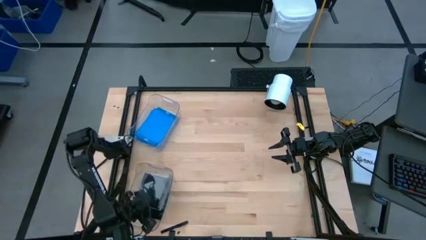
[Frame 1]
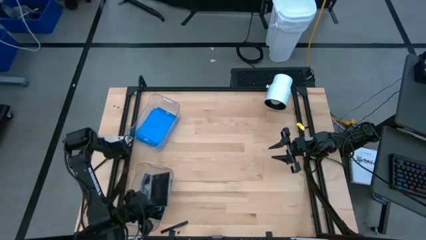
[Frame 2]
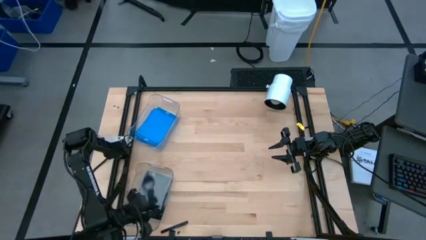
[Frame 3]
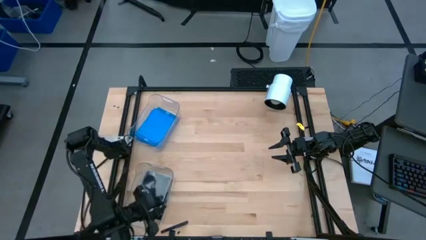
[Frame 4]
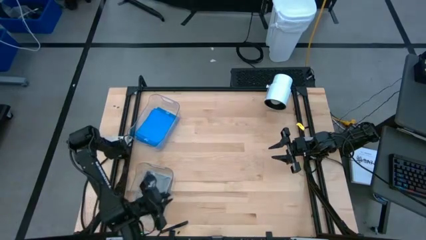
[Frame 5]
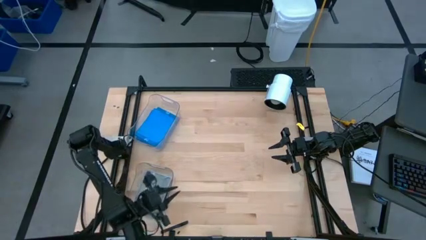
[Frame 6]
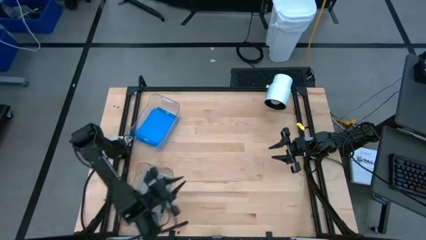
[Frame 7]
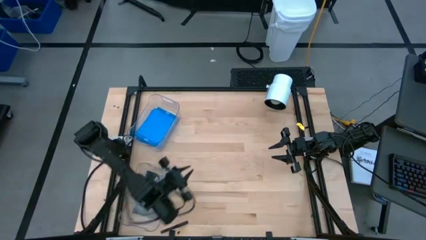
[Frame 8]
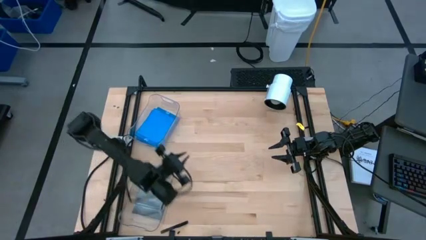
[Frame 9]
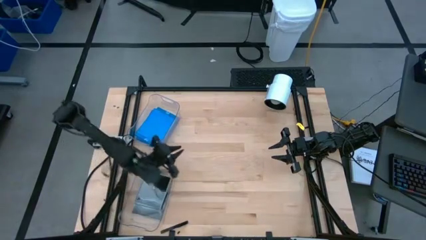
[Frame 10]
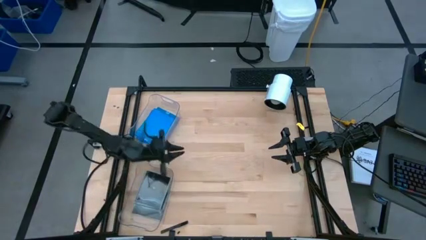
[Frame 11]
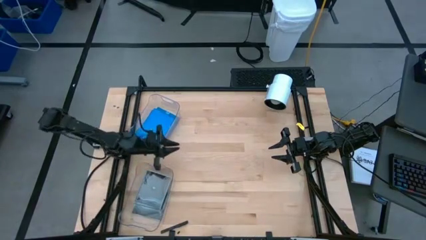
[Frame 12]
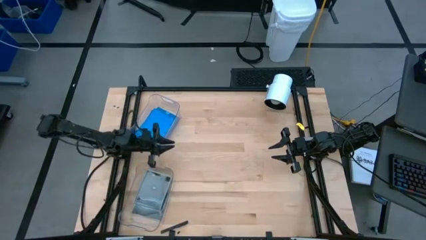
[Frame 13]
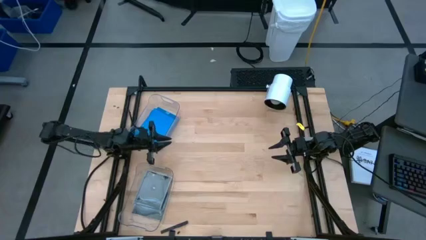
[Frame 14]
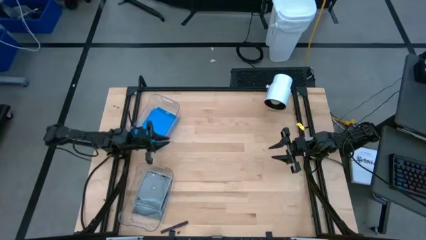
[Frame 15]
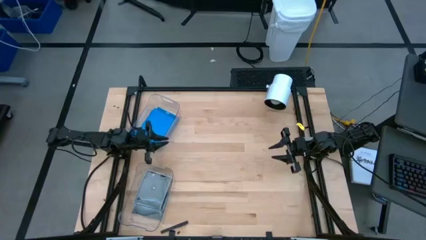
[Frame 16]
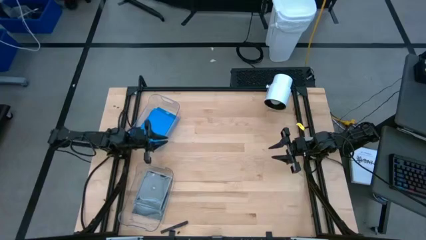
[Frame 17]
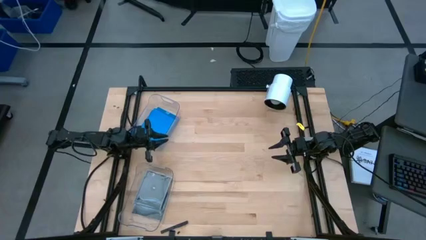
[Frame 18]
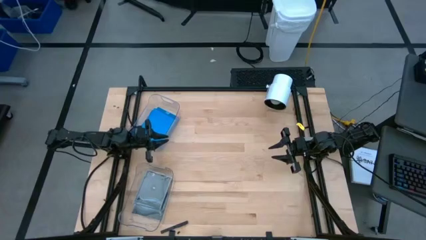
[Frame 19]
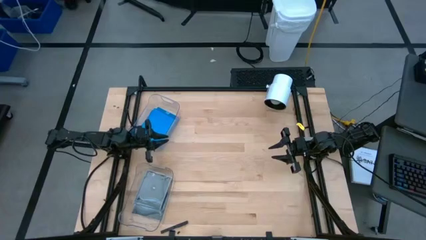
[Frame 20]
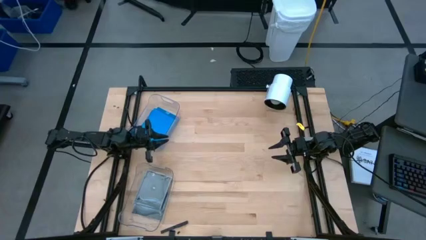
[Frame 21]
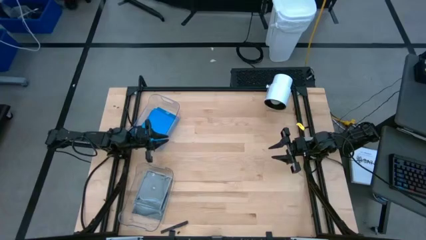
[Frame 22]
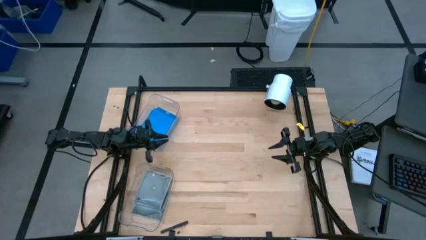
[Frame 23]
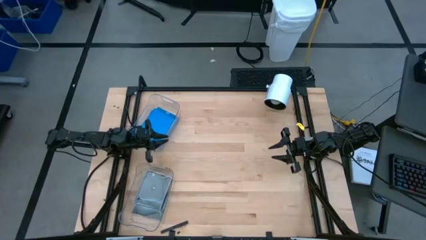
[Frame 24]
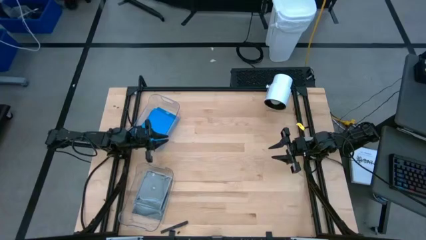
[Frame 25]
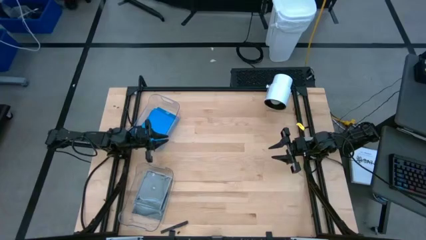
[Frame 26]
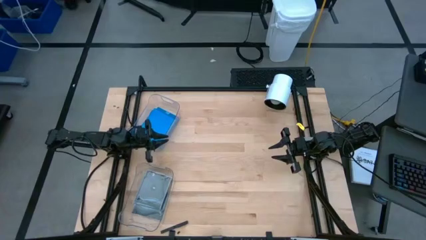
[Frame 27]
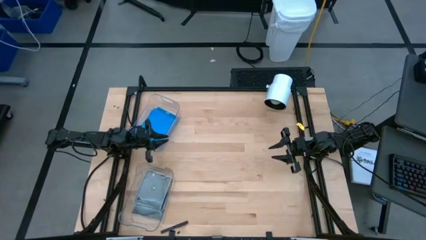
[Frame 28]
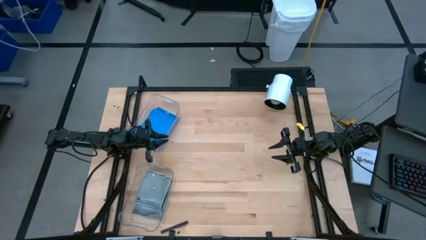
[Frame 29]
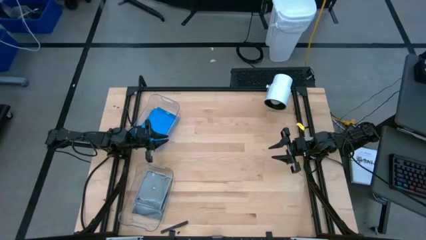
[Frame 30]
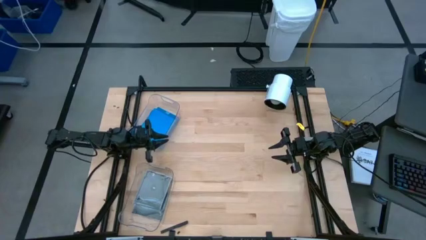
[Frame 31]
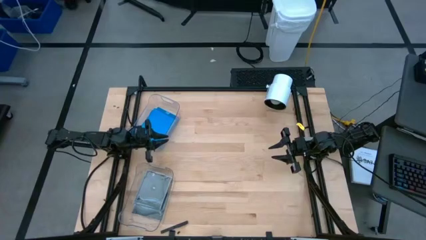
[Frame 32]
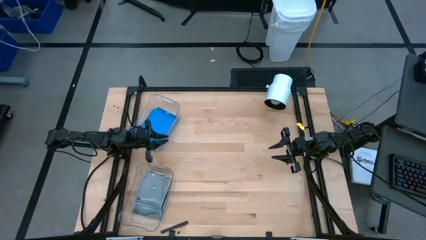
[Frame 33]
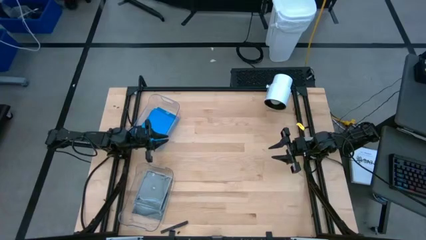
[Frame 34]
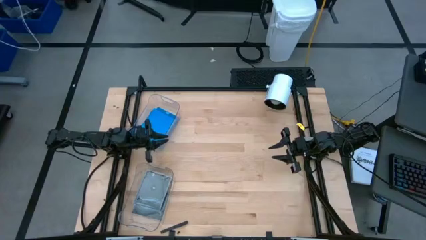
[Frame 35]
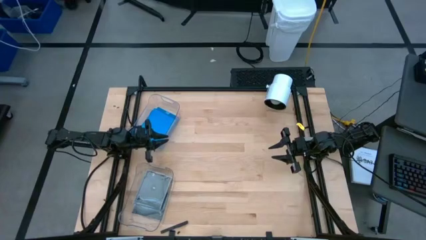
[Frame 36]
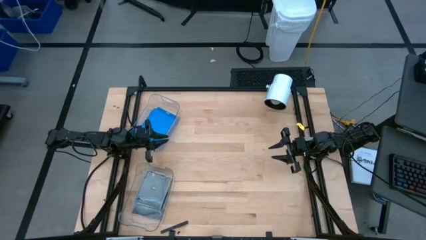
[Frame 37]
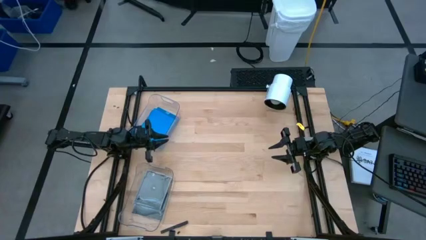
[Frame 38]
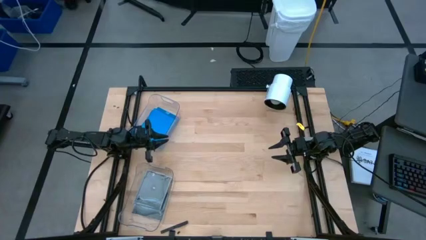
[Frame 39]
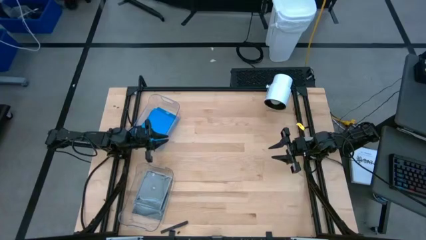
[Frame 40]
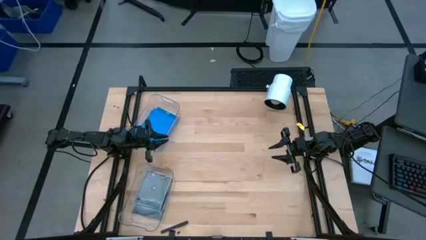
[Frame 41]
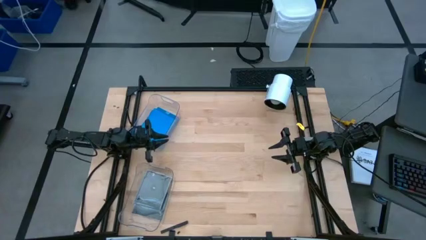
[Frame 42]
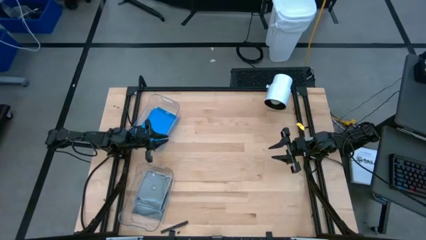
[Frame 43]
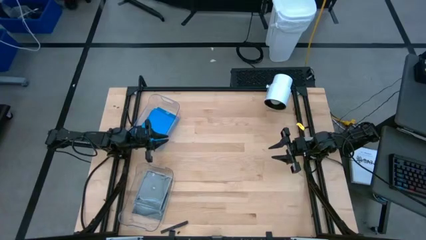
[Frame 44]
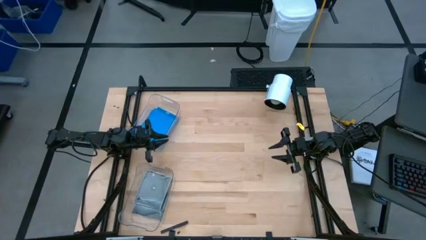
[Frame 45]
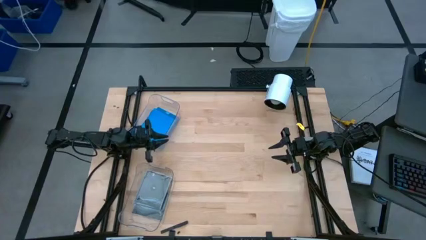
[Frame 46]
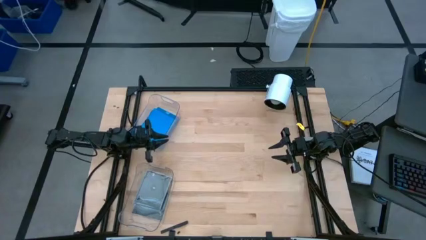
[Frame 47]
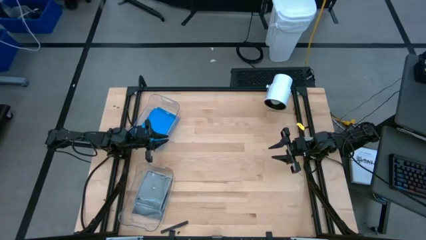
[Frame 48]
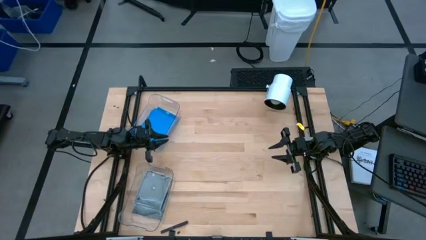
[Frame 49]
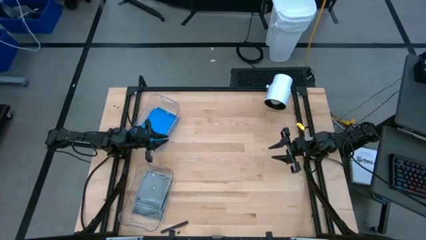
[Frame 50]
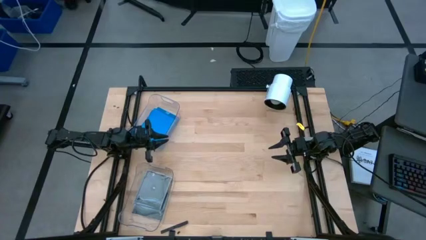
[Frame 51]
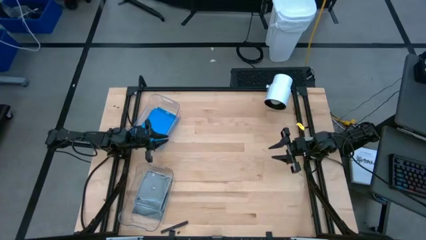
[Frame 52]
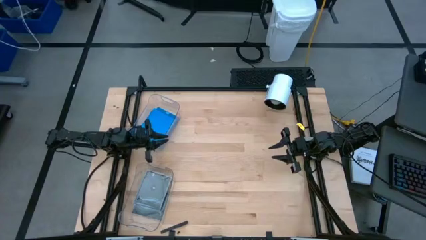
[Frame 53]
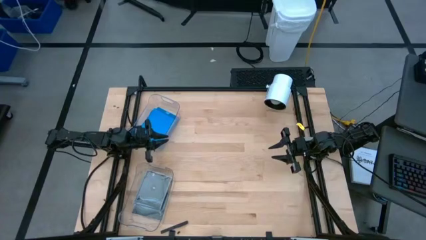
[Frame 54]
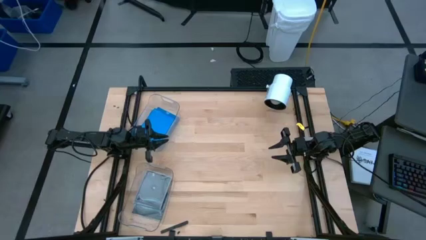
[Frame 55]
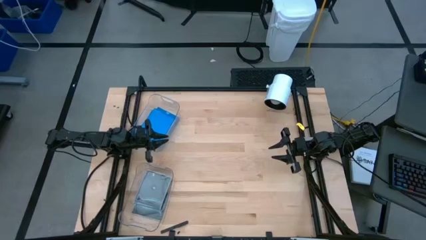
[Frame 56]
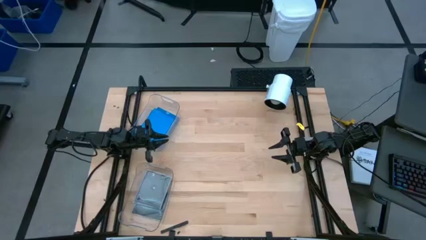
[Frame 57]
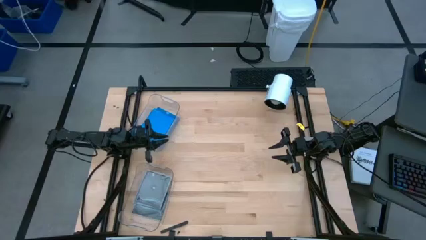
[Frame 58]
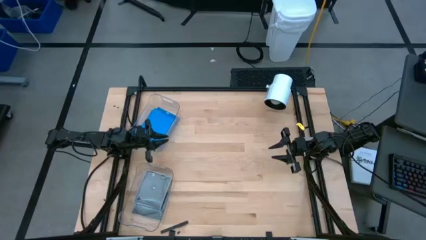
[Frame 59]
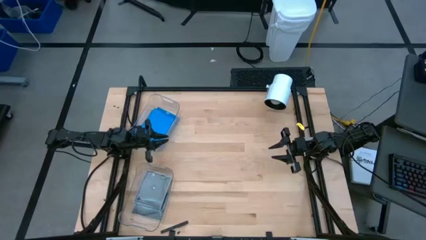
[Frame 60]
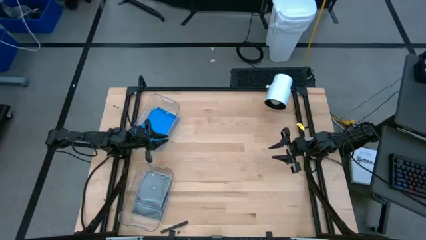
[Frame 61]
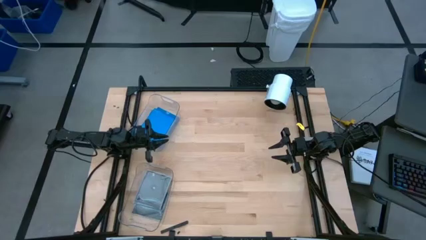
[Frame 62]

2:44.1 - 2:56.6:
Task: Pick & place jewel cases by type
Return to Home Position

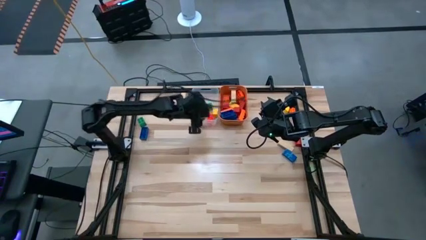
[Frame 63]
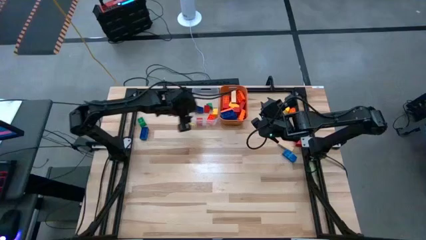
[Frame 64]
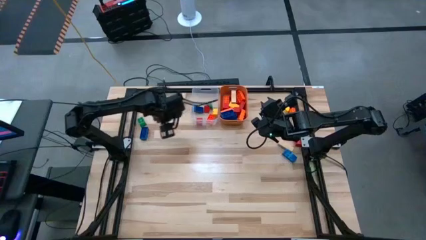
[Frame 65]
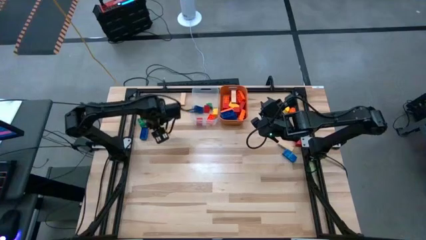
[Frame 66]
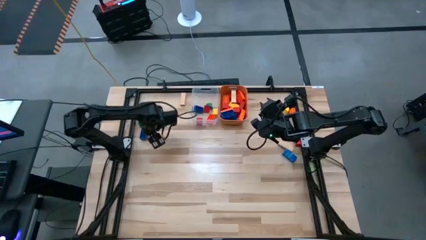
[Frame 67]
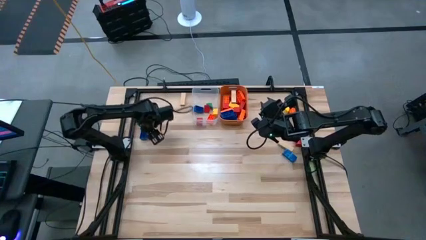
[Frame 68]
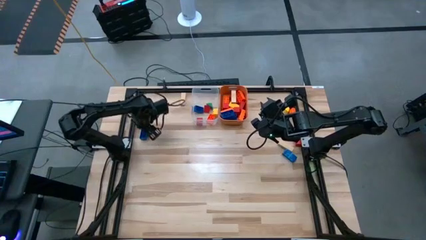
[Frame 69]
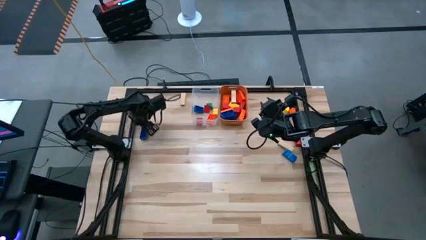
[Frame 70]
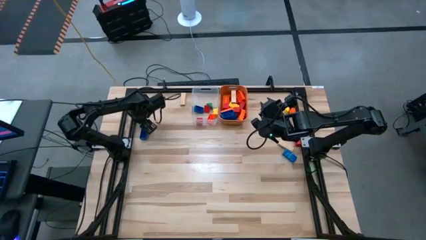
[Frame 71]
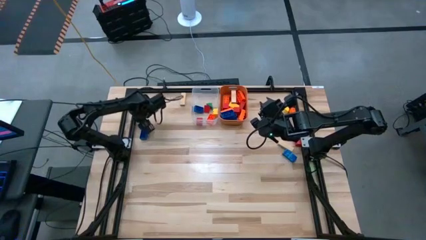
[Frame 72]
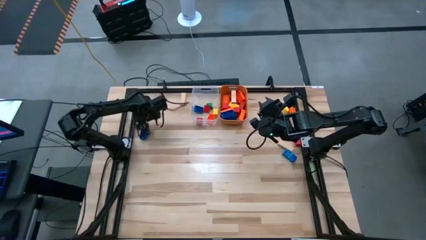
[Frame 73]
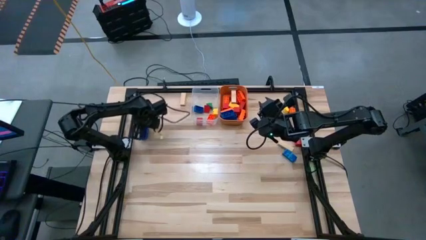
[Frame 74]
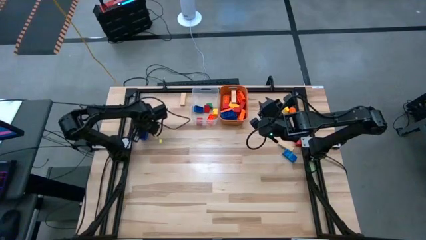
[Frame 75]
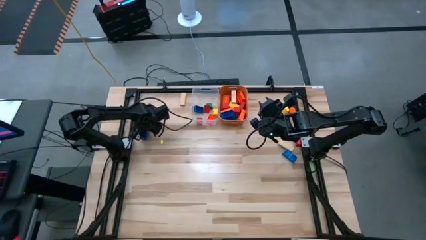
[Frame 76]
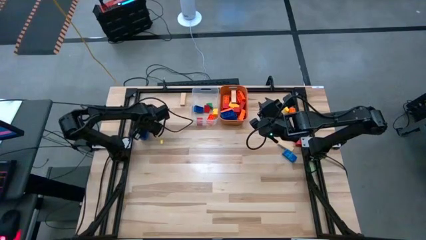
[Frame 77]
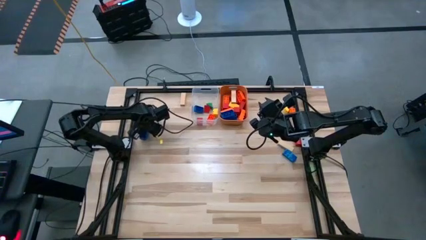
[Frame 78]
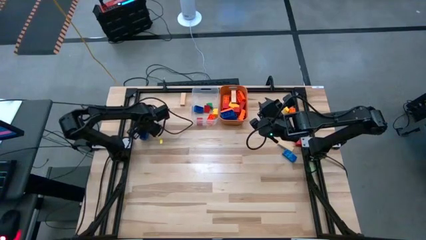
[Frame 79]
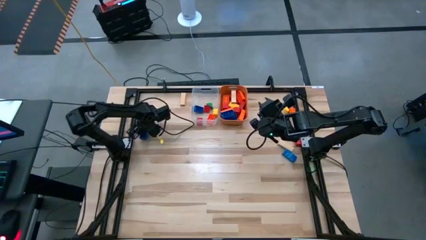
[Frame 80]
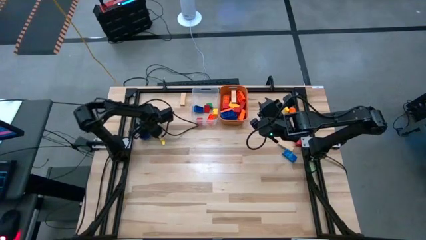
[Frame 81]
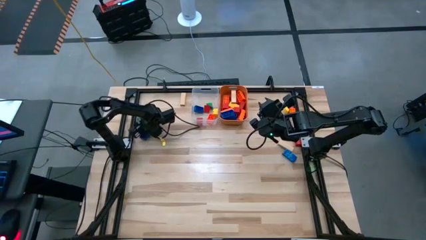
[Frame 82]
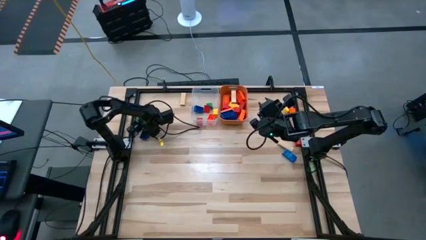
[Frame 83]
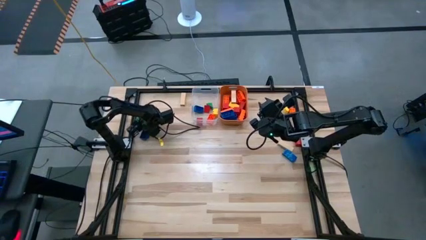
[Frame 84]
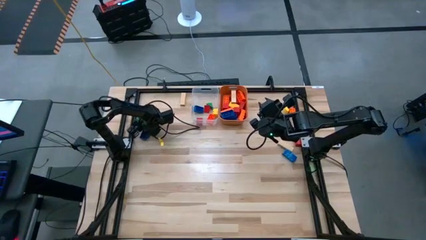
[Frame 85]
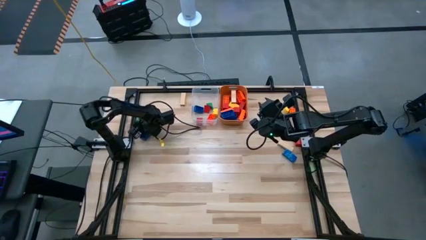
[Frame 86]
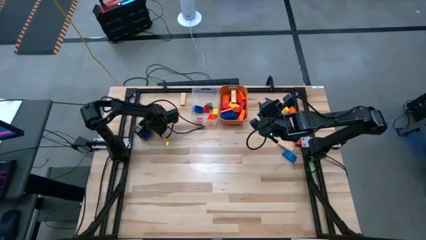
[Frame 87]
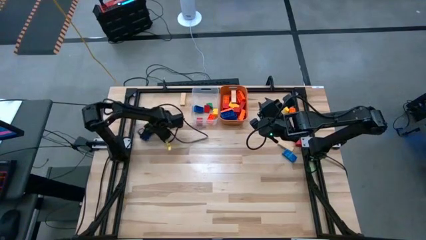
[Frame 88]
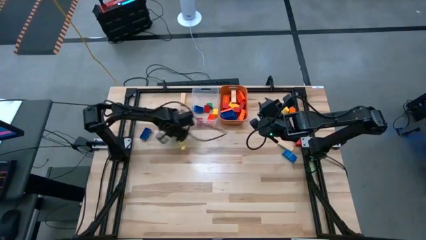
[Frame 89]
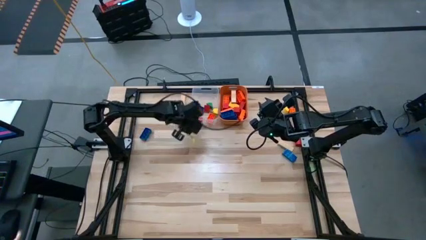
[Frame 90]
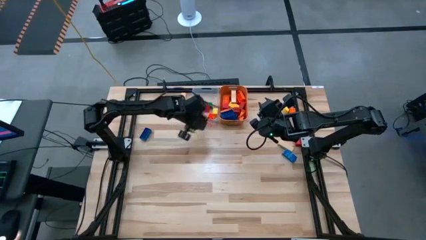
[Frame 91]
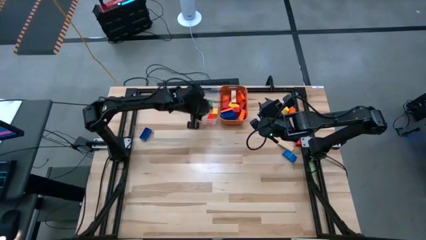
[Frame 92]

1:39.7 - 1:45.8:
Task: Sort blocks by size
Put the green square game piece into the clear bin
